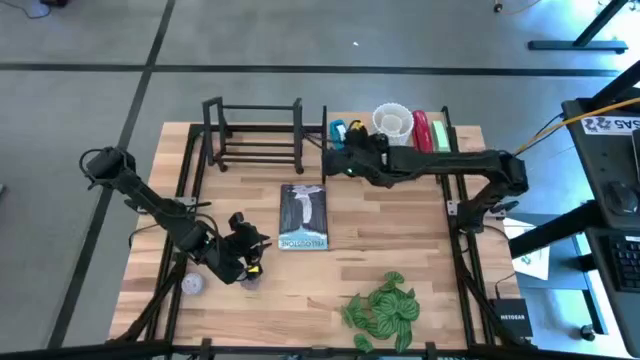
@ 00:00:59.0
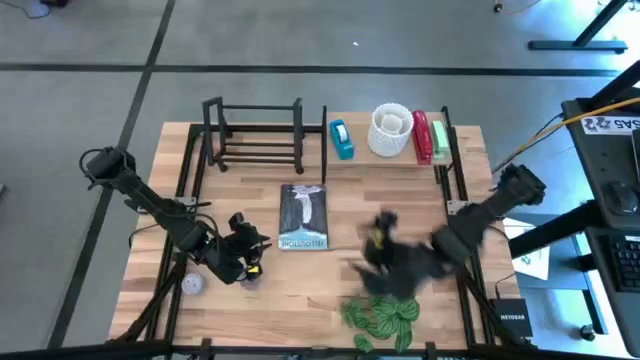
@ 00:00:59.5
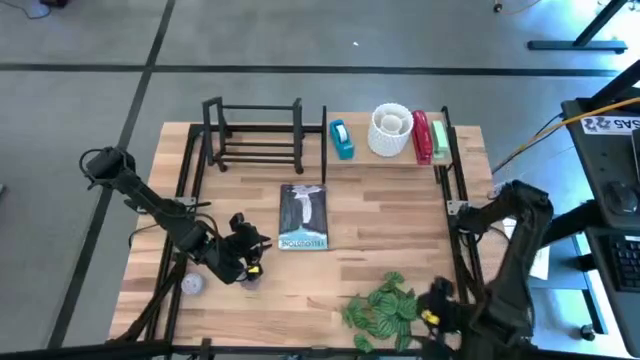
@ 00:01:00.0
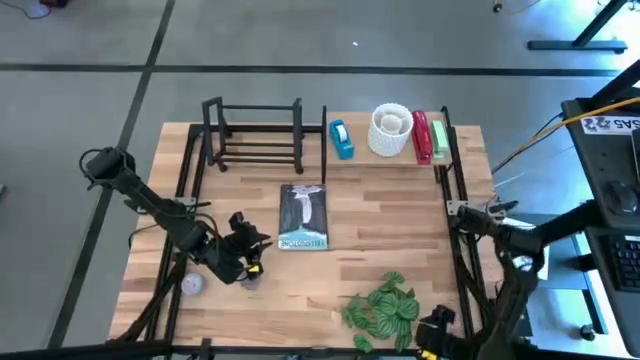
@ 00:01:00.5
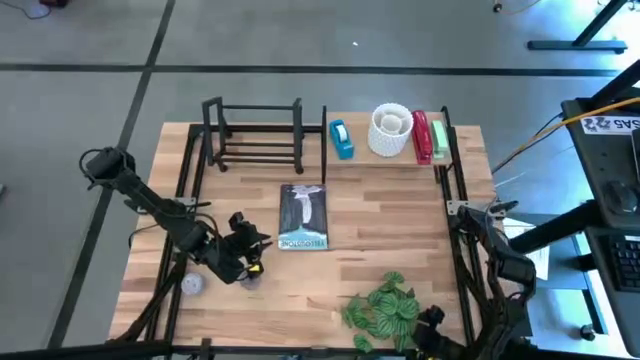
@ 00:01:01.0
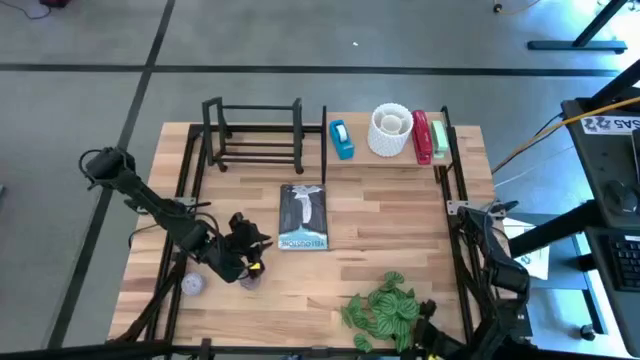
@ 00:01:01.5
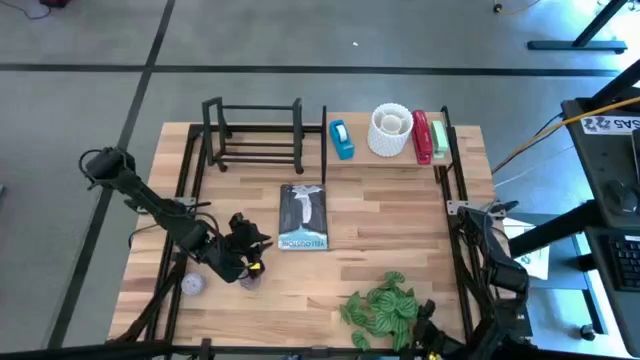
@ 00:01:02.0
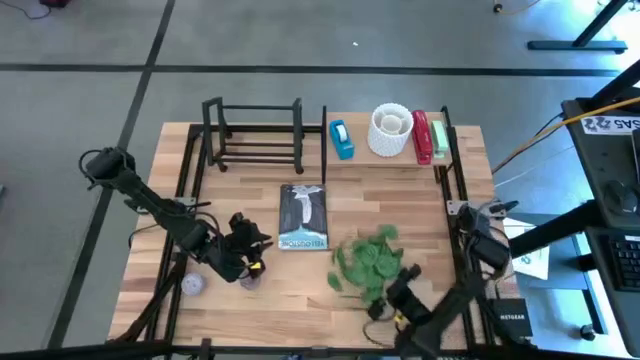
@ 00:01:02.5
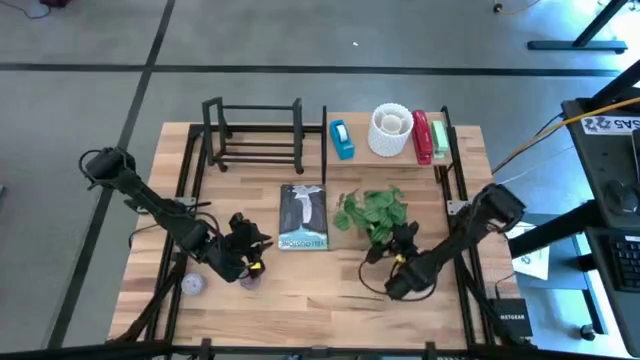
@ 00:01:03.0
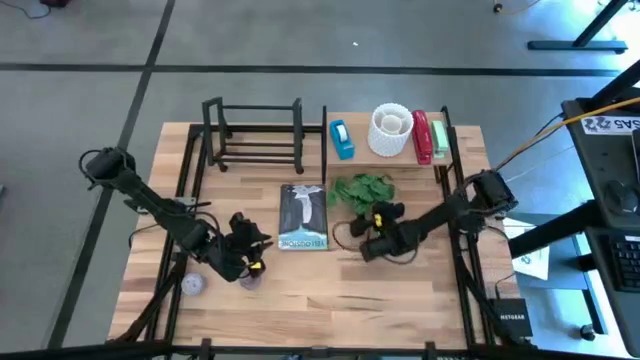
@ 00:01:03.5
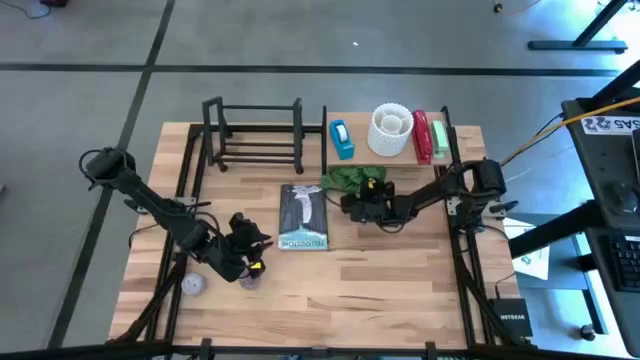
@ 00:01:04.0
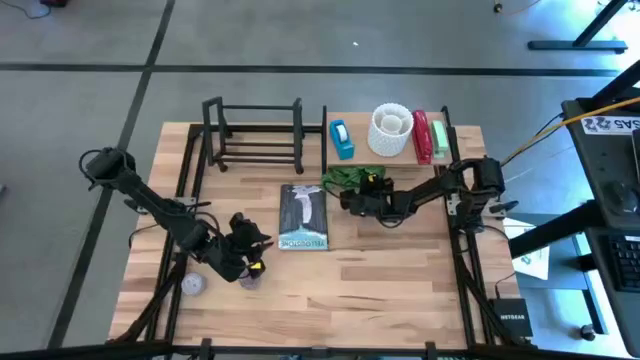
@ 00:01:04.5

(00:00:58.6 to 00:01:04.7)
Task: Stock shelves
Move the white pot below the shelf

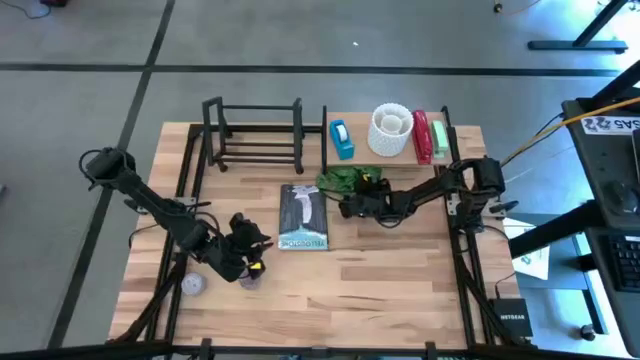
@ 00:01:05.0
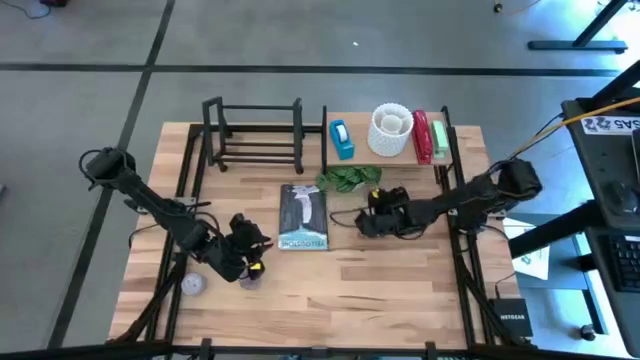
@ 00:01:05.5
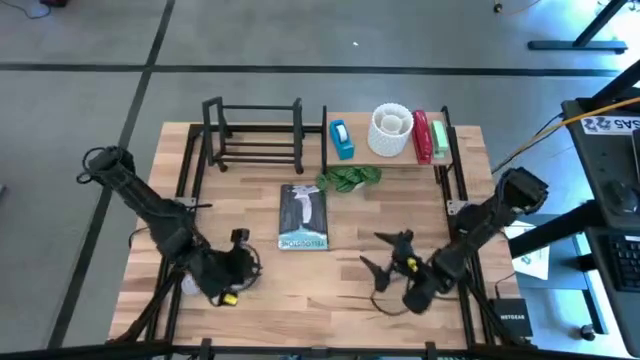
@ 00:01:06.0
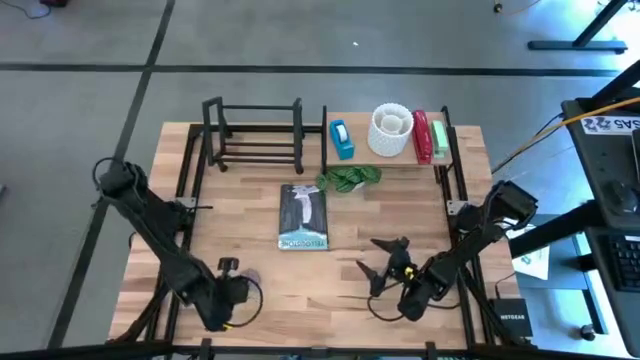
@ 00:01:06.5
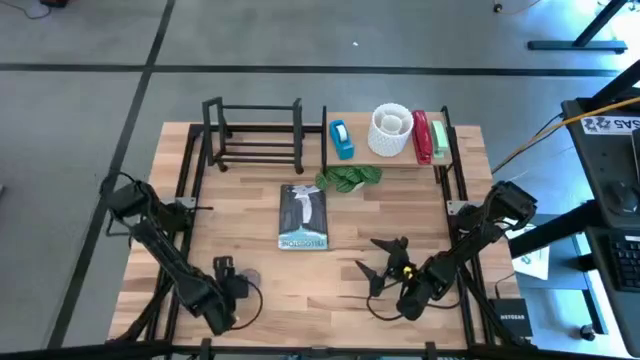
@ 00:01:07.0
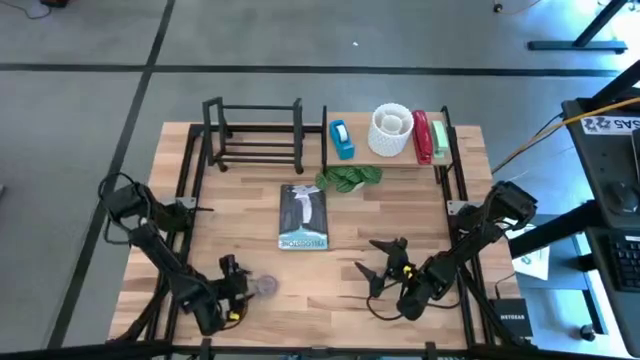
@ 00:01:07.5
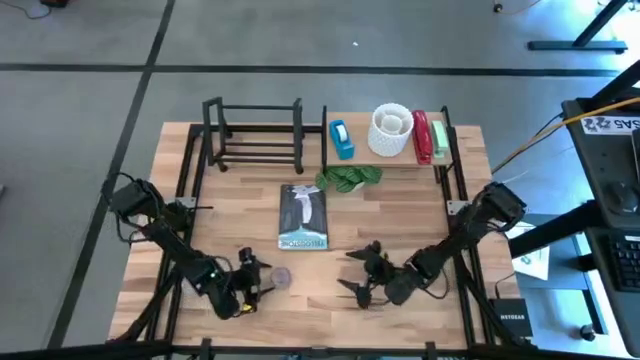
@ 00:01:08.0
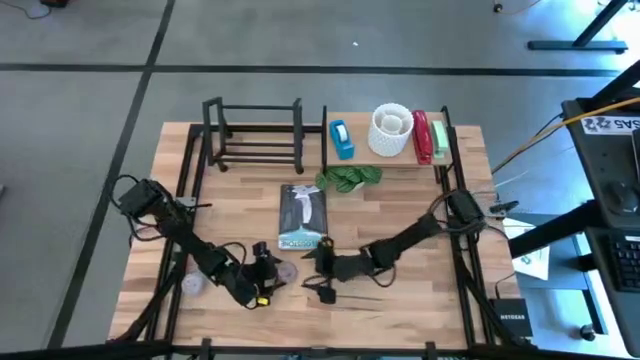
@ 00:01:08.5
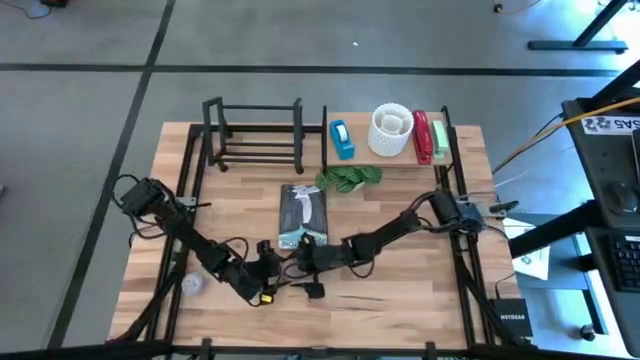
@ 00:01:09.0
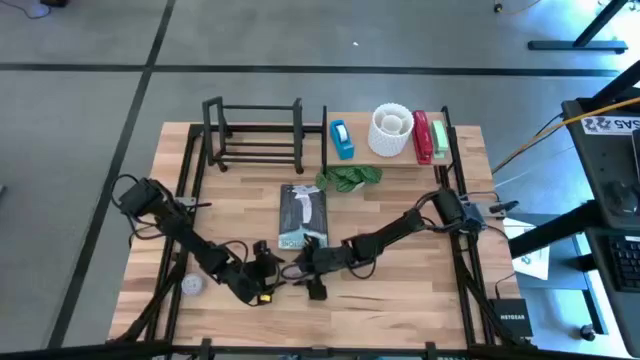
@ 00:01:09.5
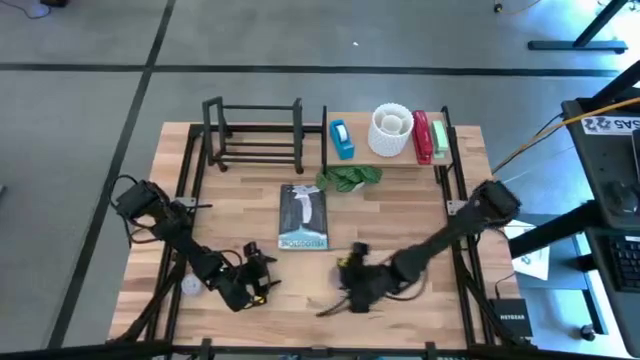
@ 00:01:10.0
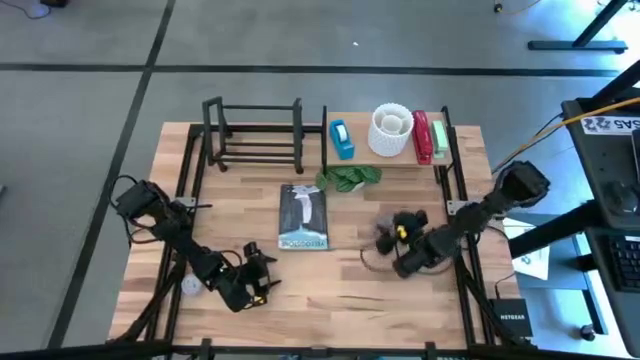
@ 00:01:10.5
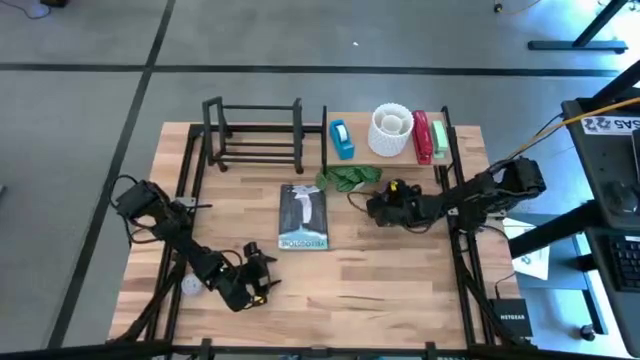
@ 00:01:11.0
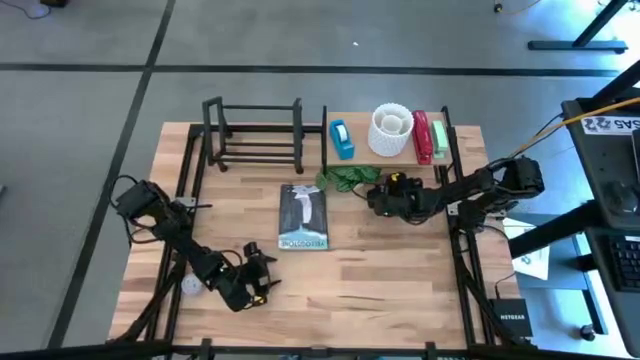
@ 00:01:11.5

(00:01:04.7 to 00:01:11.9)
Move the red patterned scented candle below the shelf

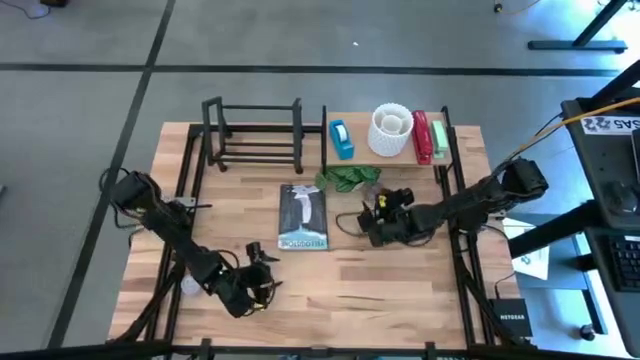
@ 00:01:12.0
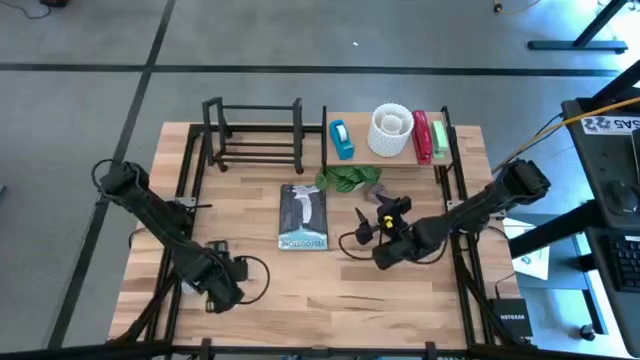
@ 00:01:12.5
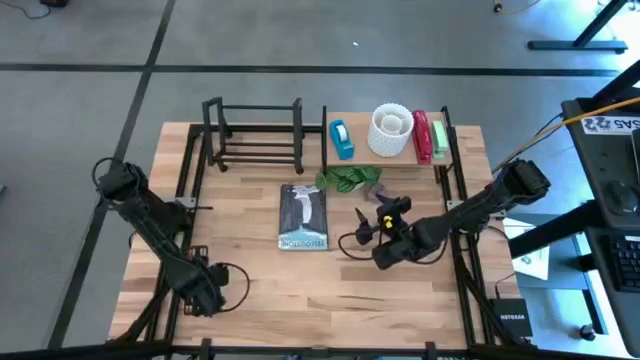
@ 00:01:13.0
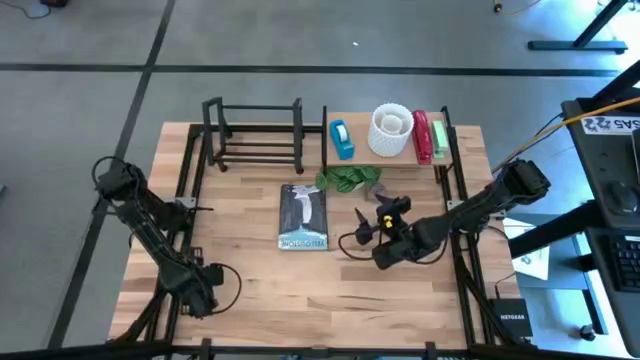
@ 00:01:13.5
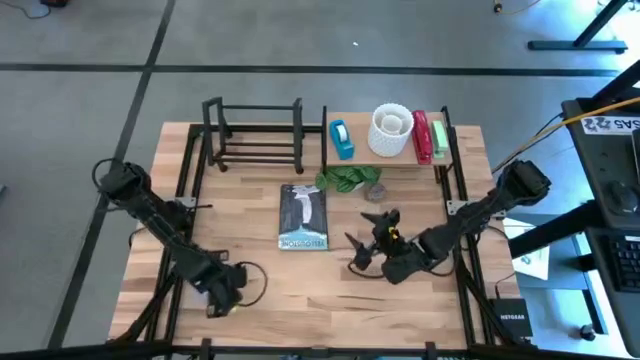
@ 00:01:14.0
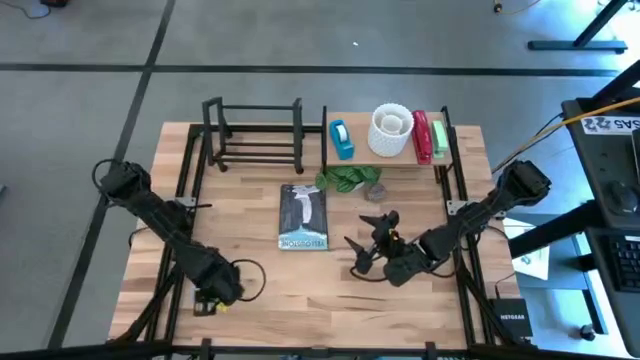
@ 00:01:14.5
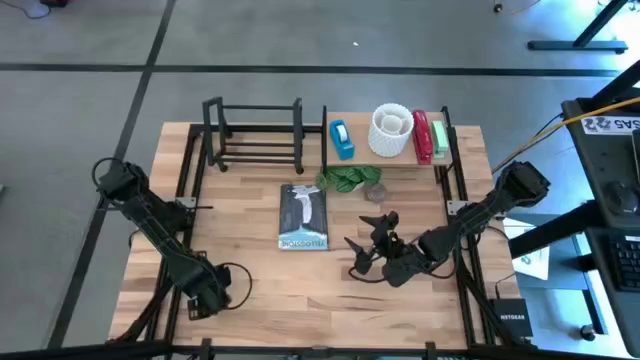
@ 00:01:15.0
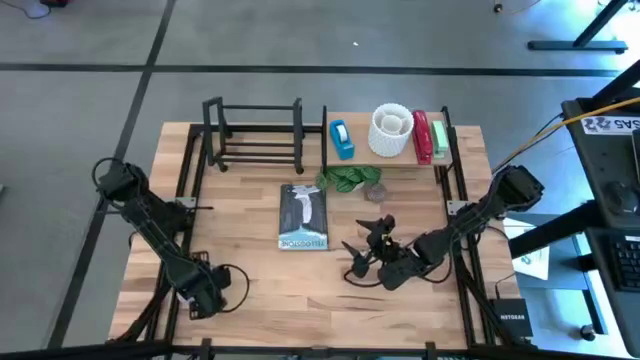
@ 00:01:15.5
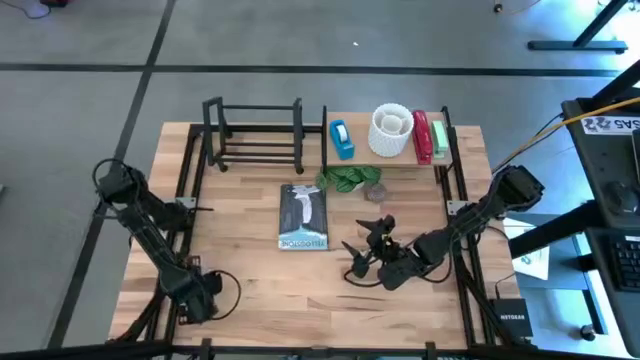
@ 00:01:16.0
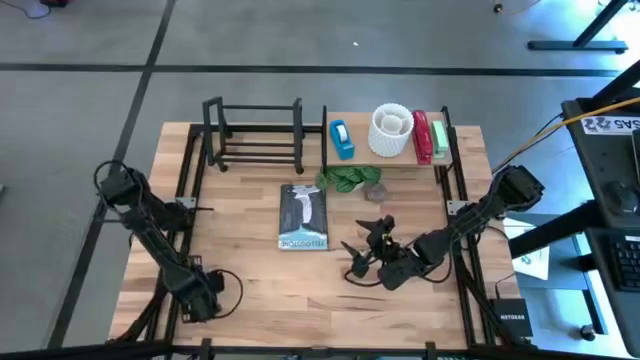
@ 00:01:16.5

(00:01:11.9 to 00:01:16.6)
Move the white patterned scented candle below the shelf

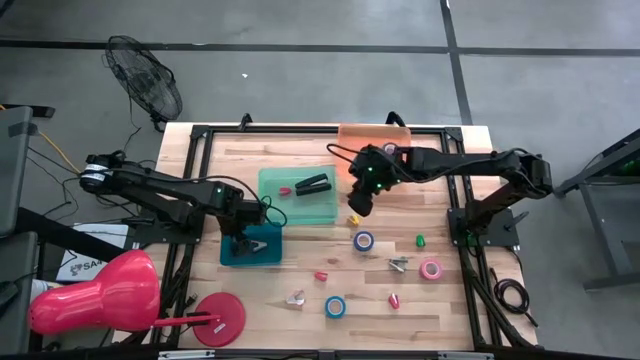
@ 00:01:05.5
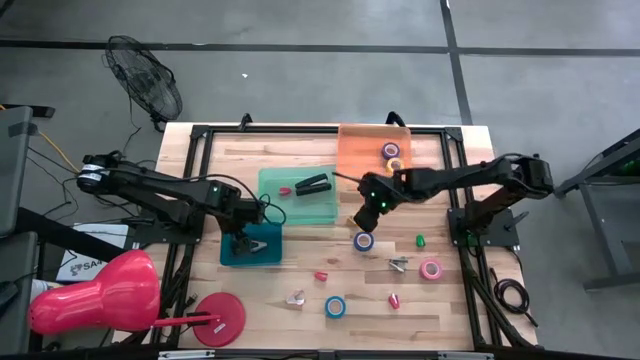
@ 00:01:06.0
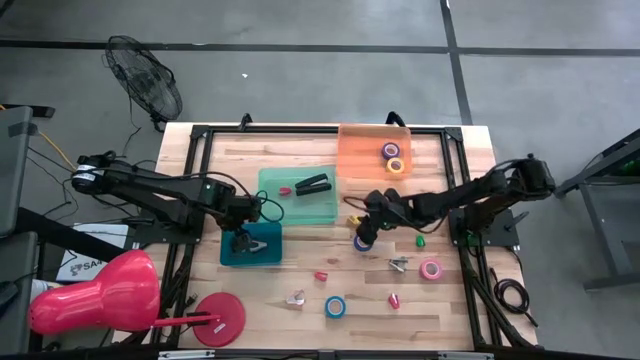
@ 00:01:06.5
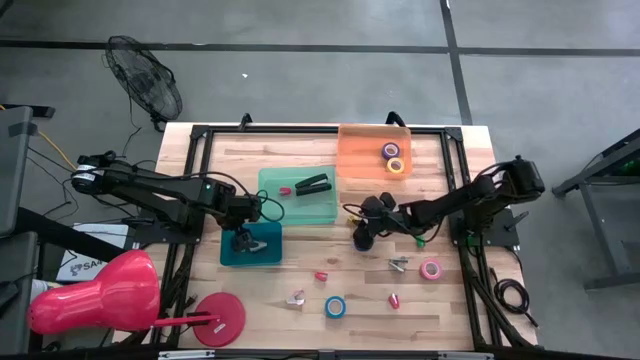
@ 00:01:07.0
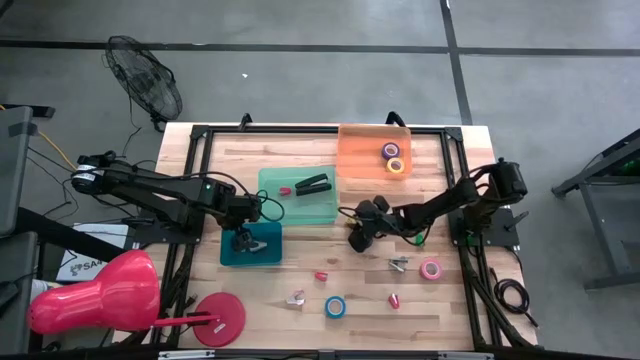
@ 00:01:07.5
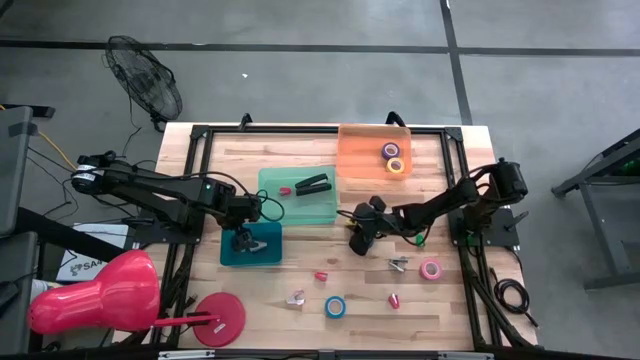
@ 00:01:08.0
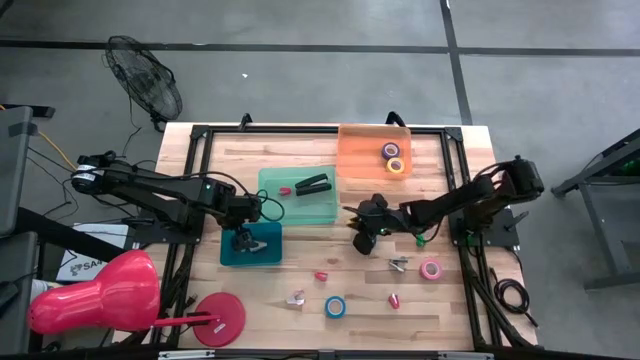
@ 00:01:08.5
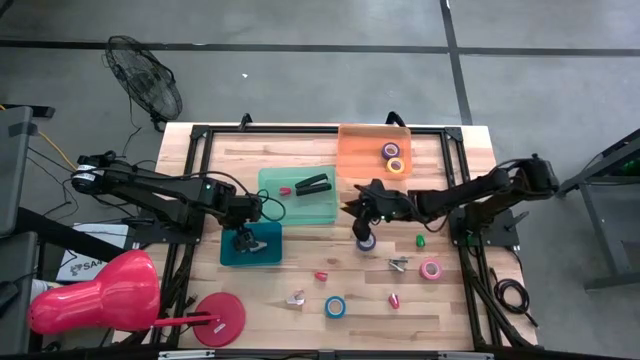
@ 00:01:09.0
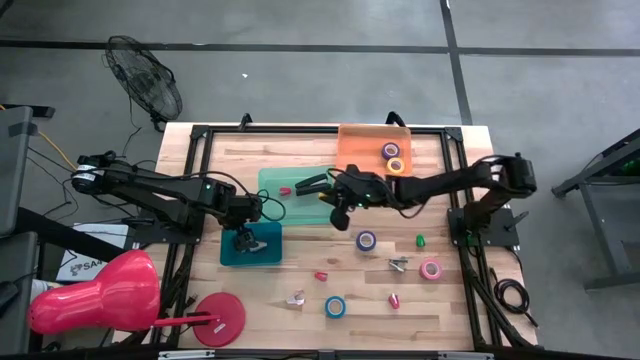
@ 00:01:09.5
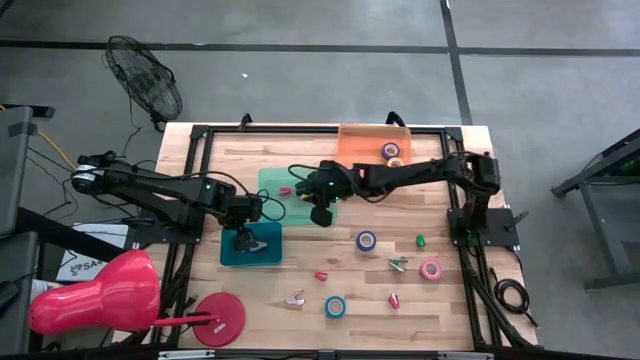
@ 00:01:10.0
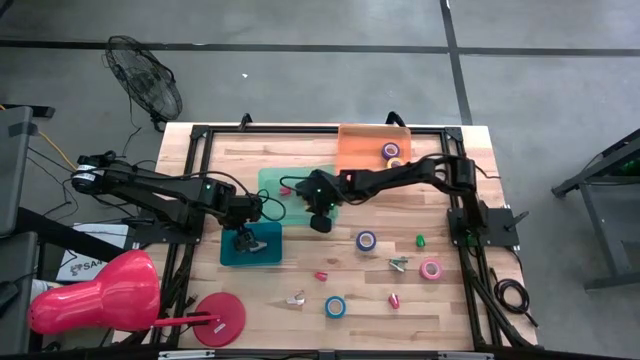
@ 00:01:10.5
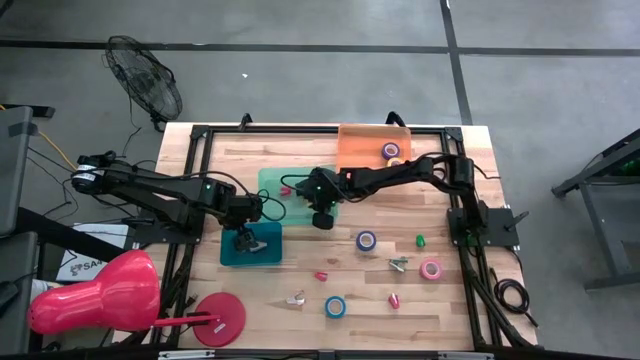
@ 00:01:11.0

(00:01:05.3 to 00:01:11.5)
Task: Pick and place Stapler, Stapler remover, tape
Put the yellow small staple remover in the light green bin
